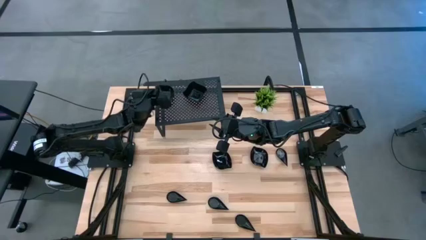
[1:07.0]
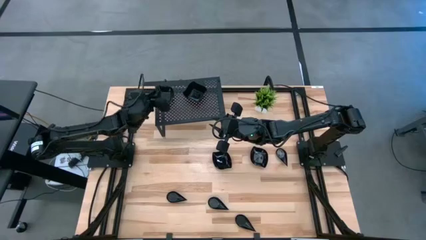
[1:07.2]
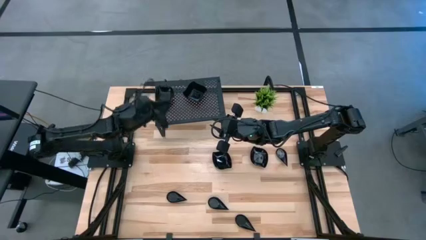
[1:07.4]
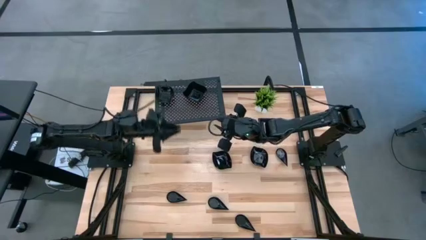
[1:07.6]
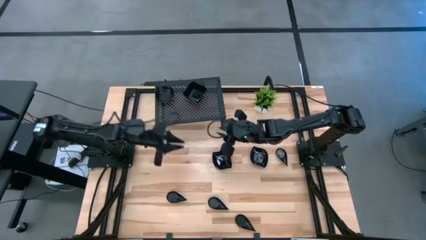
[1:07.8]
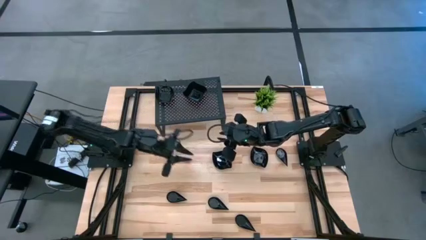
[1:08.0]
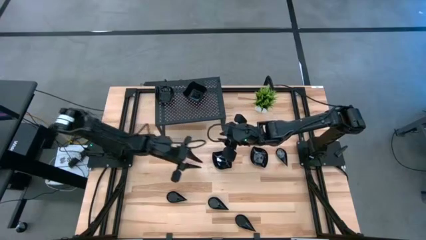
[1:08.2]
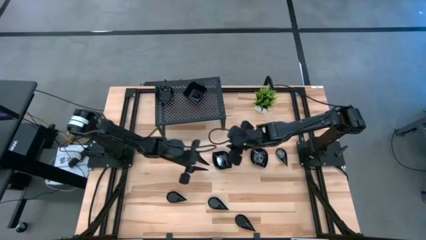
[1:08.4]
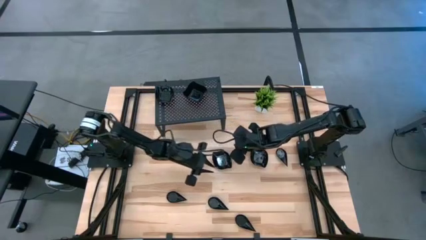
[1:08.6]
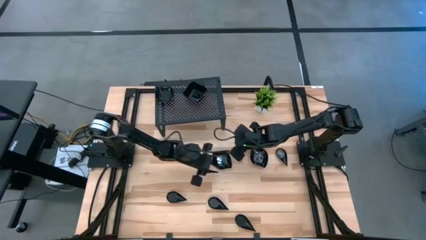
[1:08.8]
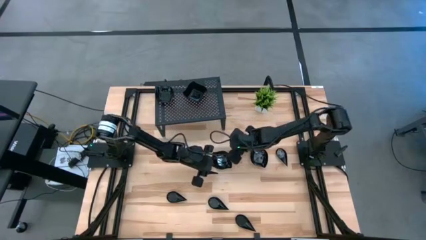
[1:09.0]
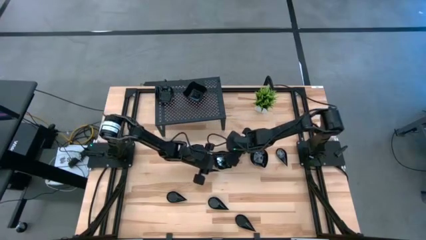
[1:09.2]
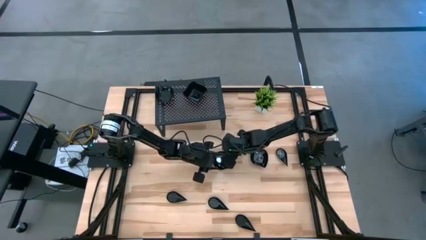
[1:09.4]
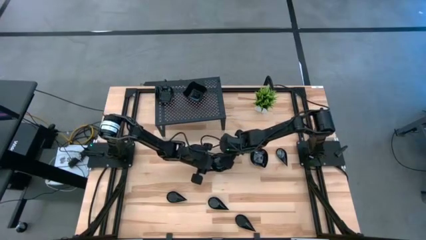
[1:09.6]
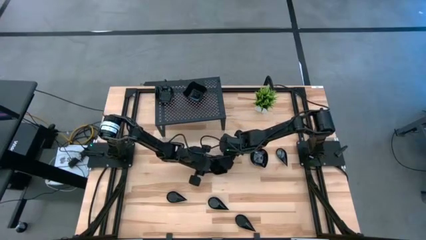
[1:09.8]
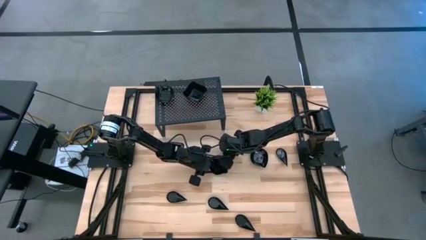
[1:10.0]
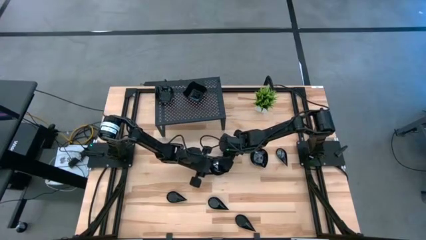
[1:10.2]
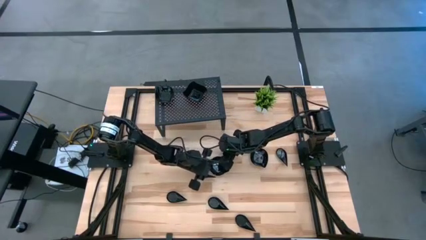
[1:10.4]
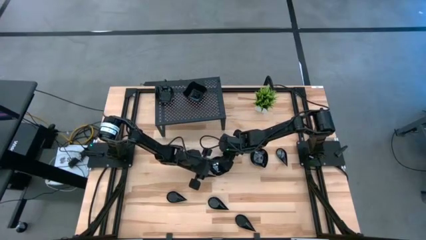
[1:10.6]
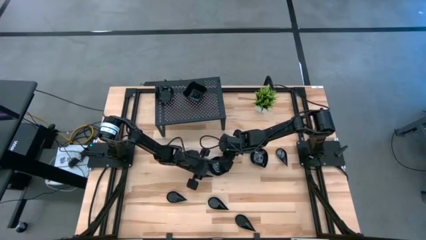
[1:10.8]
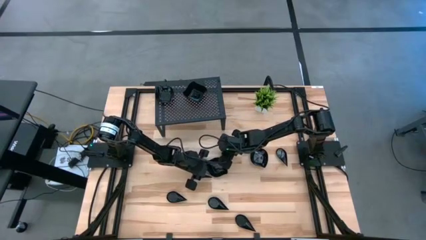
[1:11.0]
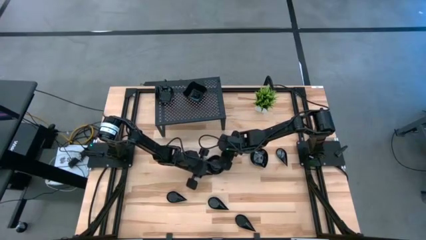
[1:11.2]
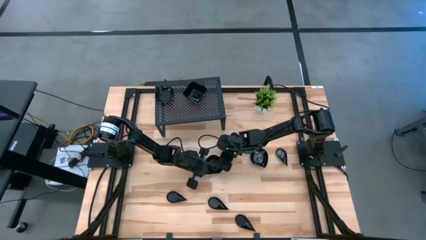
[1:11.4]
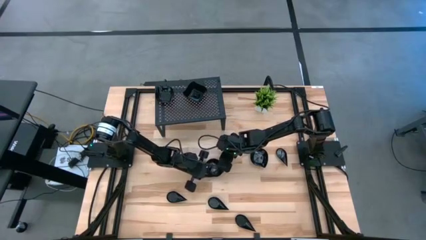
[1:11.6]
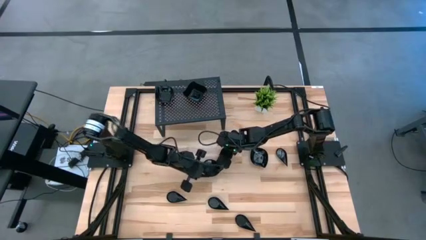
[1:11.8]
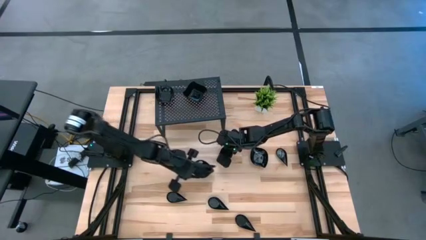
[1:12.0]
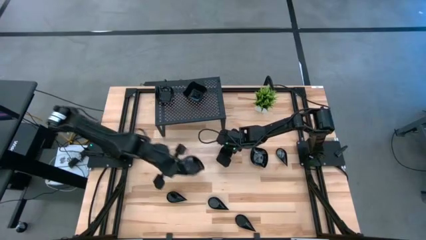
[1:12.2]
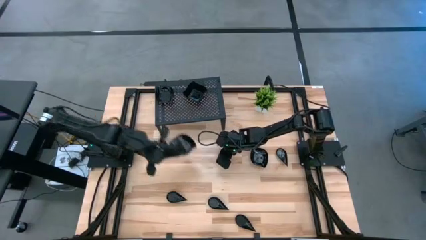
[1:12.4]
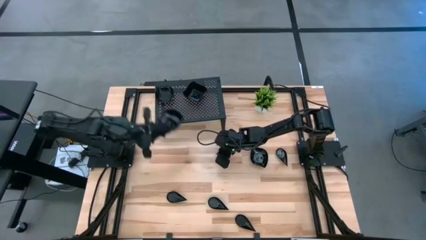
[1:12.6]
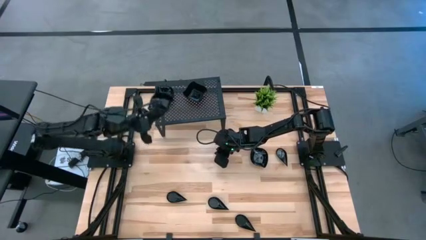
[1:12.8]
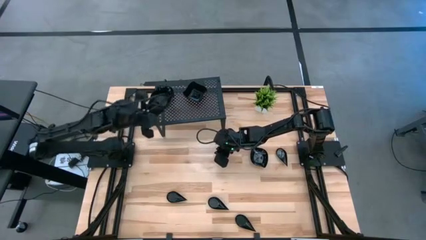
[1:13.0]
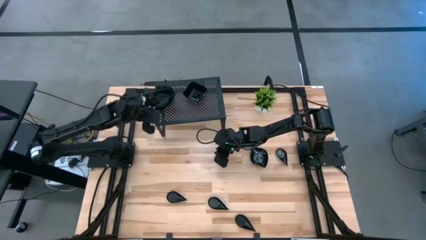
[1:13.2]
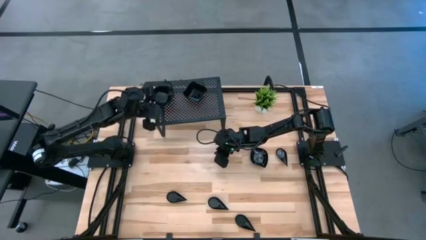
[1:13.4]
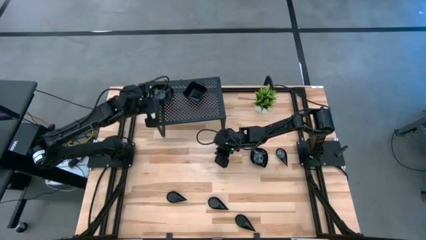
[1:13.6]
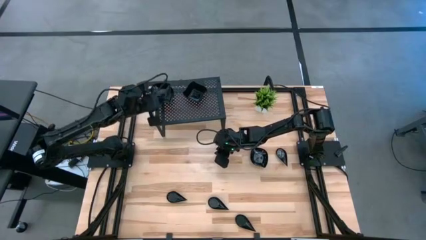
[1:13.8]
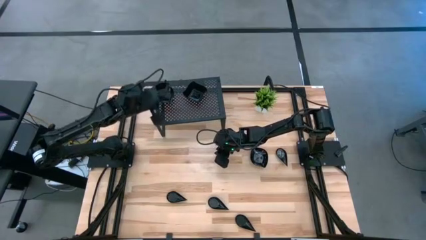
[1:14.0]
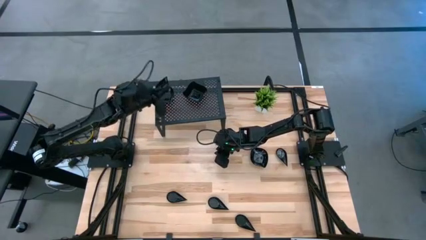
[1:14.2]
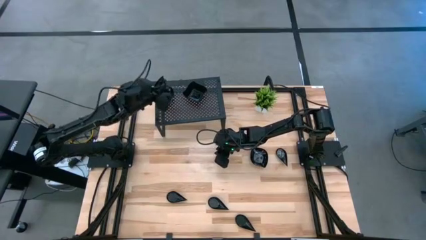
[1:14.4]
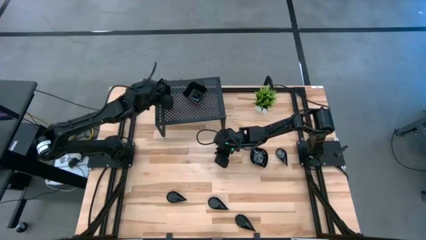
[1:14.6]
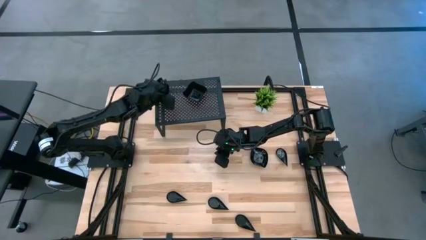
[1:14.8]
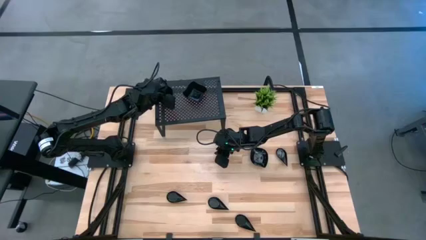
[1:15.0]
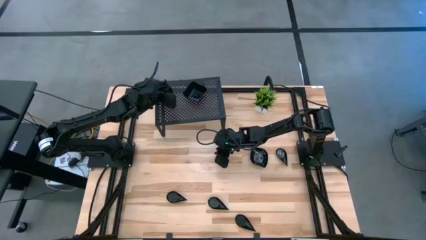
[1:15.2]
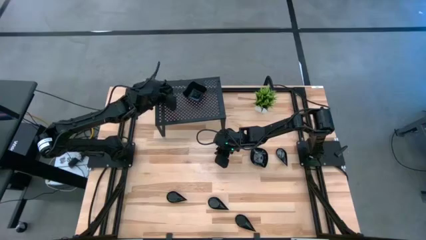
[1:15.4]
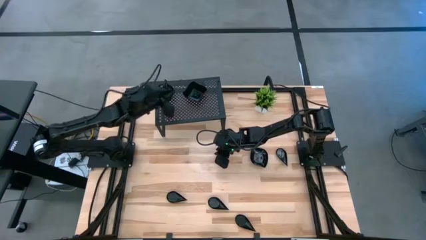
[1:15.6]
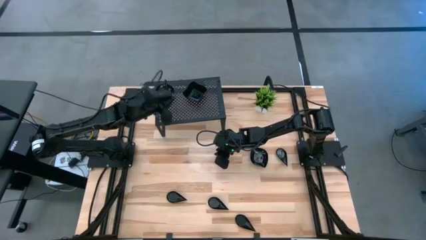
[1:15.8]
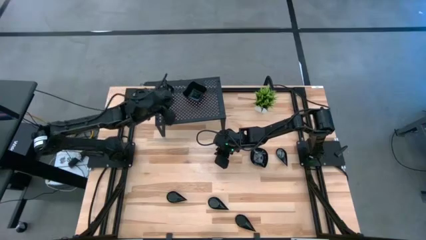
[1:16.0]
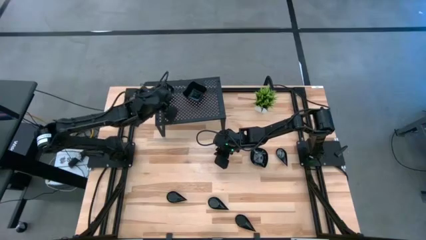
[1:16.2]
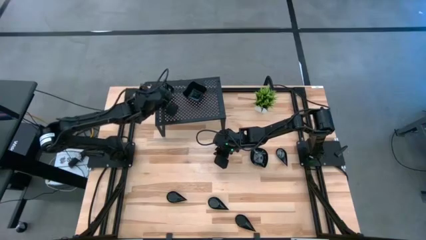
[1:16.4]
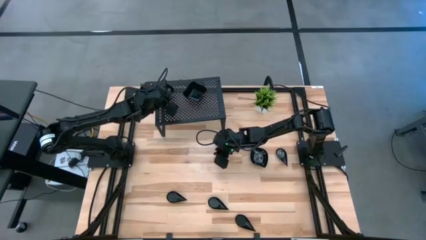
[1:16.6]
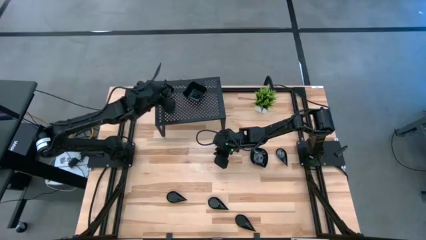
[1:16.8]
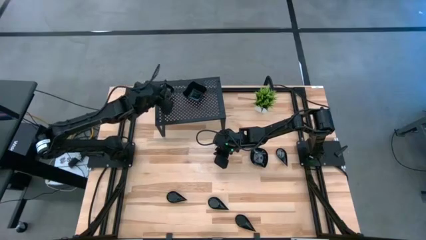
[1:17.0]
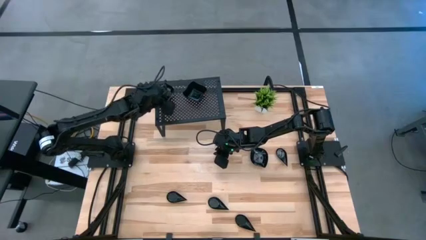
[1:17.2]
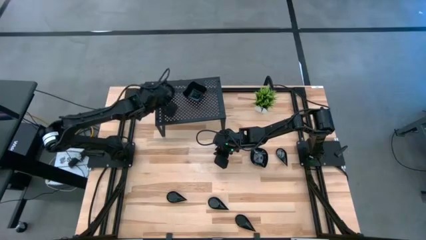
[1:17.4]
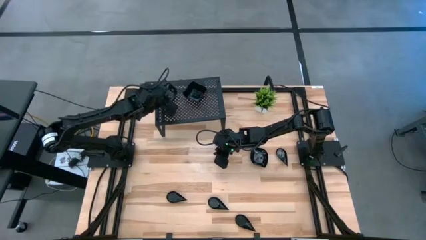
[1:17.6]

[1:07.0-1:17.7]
Task: Pick & Place Mini shaped plates
Stack the black leaf shaped plate on top of the black leaf shaped plates on the shelf

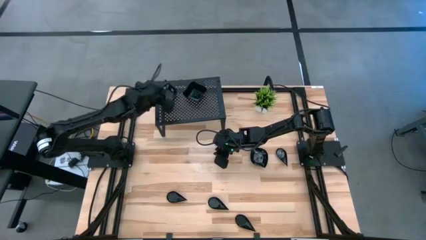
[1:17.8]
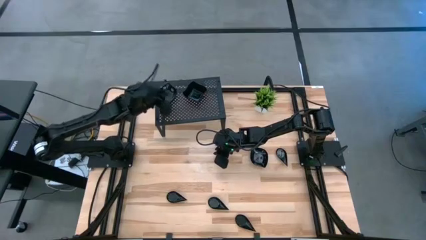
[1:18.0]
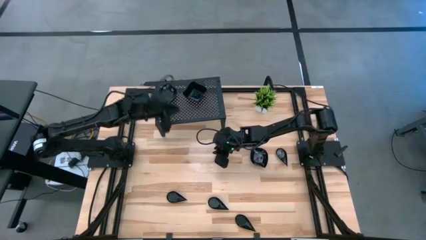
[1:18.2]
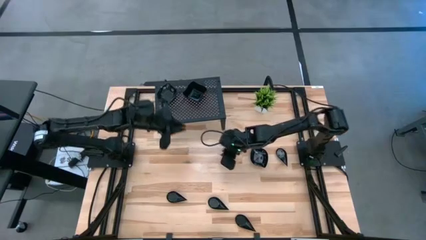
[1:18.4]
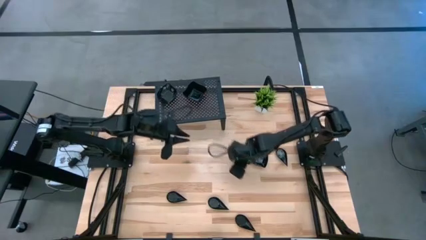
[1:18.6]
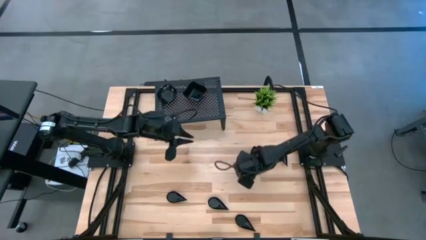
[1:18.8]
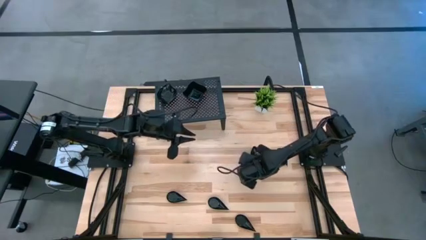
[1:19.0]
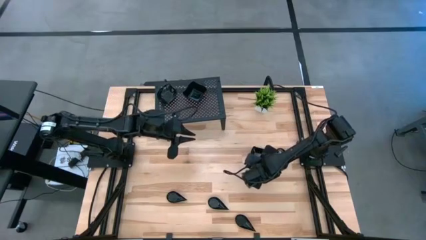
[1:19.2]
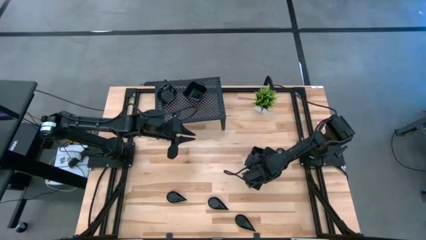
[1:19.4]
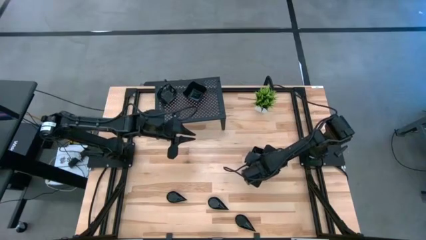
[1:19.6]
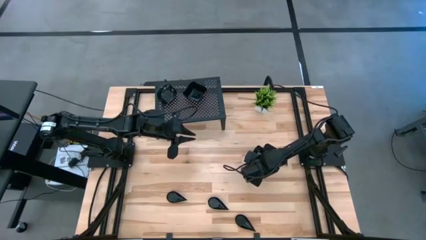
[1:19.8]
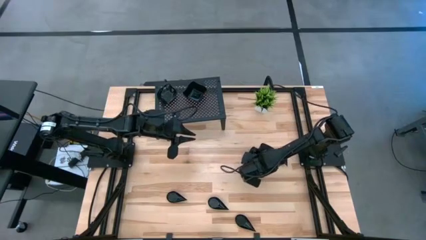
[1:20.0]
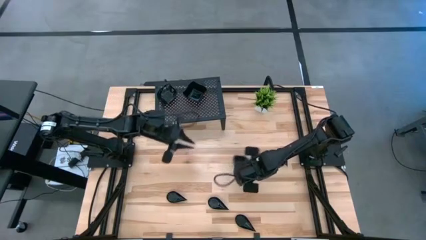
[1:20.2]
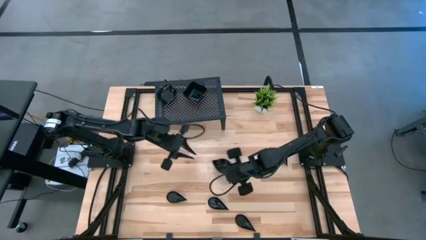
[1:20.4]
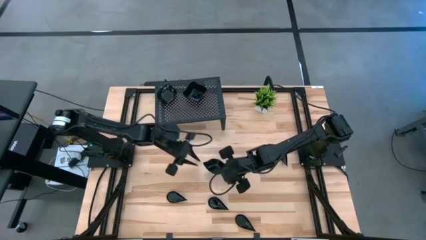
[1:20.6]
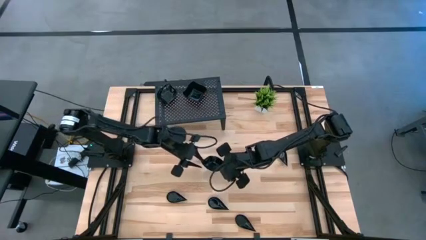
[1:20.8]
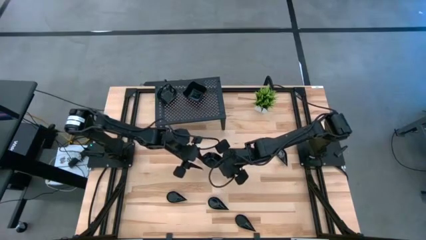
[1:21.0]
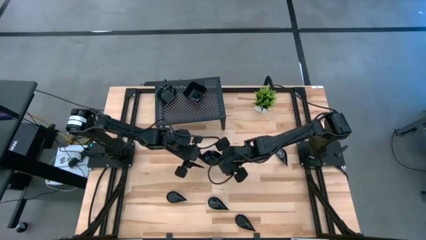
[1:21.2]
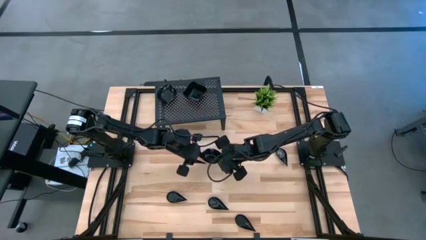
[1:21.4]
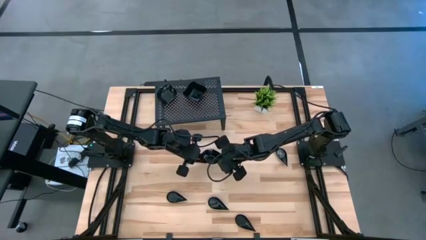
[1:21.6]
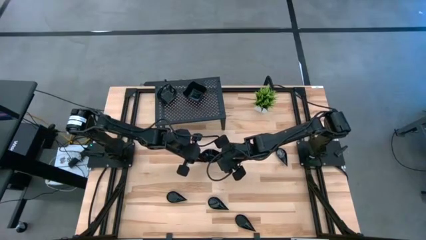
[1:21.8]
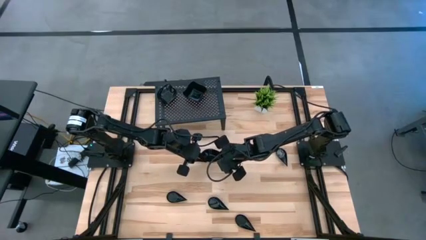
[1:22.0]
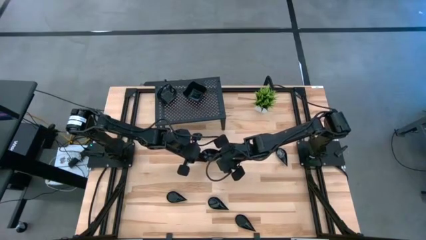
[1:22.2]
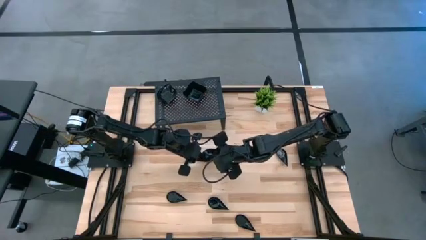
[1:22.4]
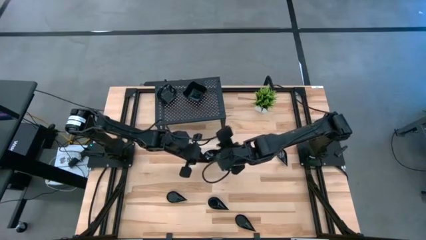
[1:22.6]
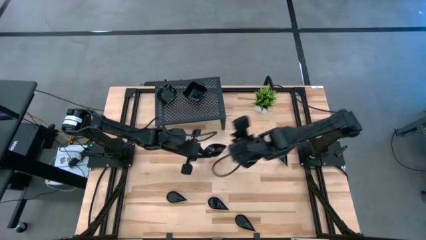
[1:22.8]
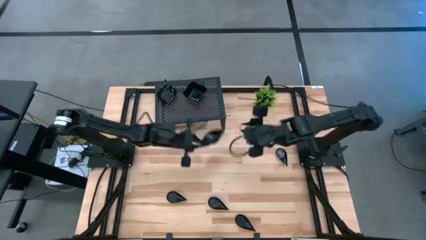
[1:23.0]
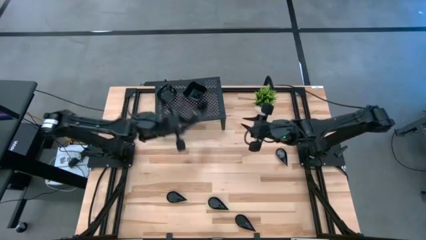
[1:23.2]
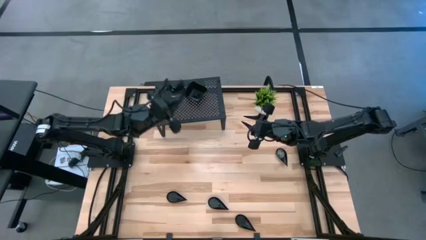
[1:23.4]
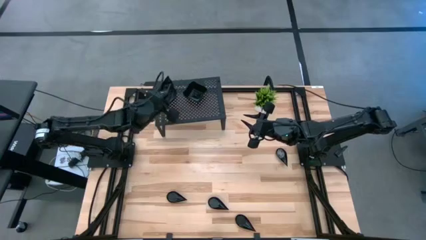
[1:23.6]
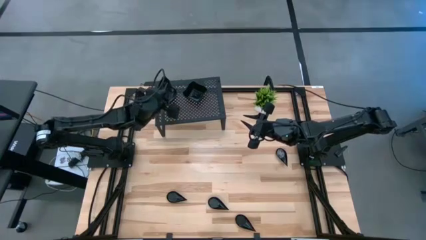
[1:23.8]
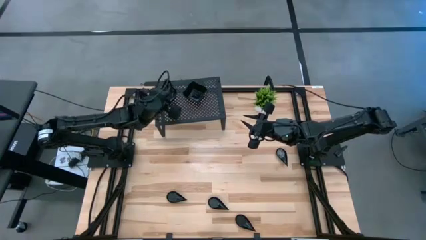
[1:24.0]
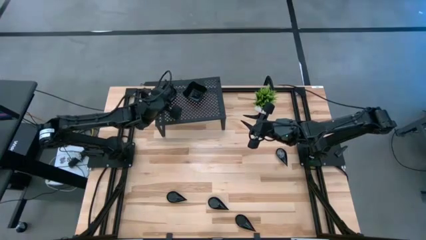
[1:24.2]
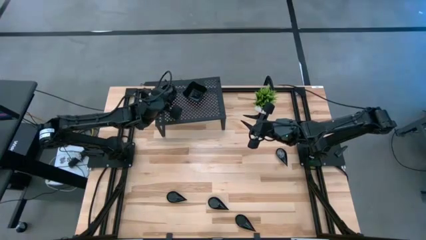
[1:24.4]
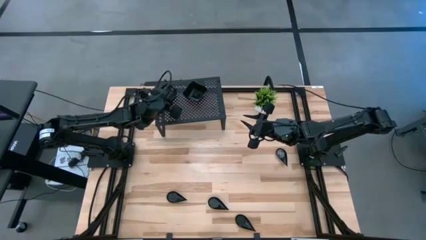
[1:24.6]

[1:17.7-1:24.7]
Stack the black leaf shaped plate on top of the black leaf shaped plates on the shelf
